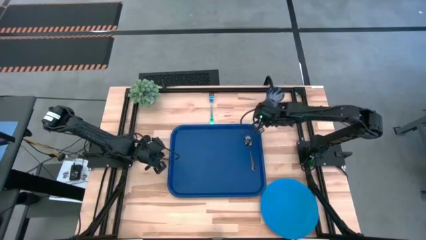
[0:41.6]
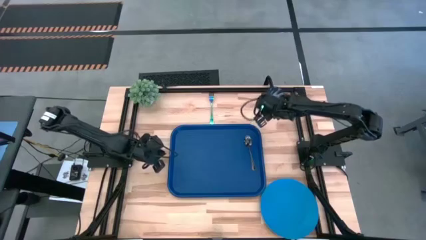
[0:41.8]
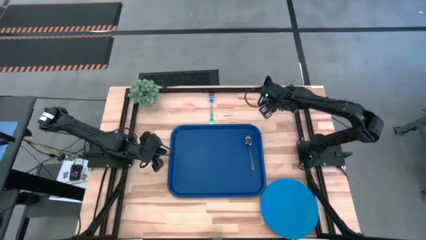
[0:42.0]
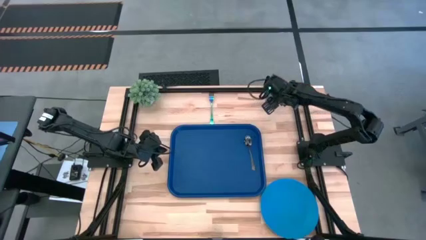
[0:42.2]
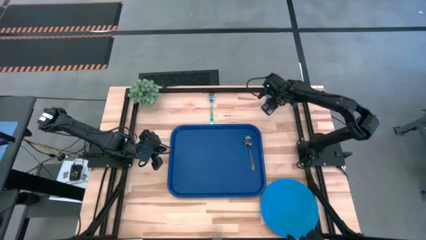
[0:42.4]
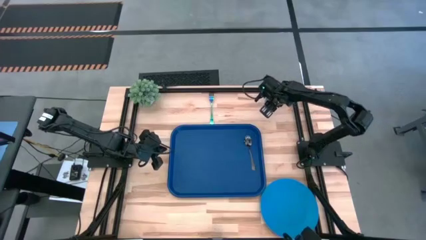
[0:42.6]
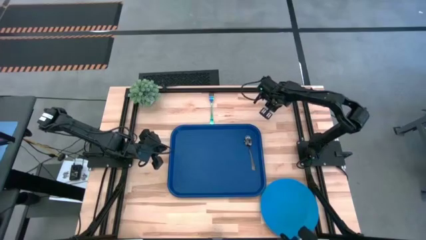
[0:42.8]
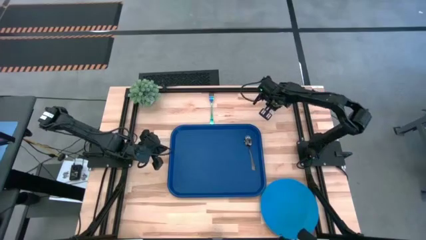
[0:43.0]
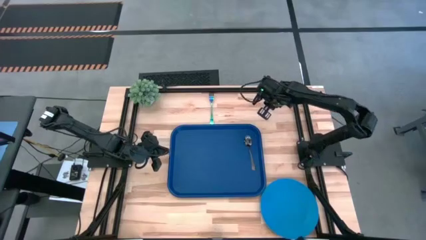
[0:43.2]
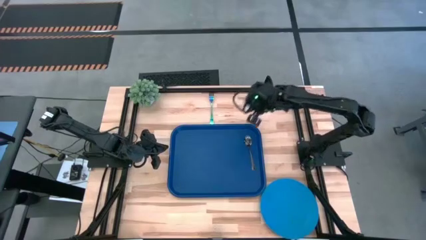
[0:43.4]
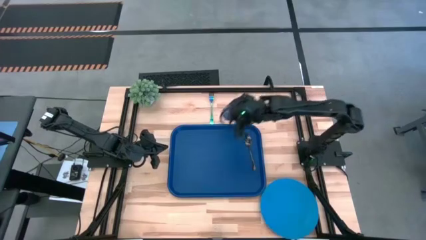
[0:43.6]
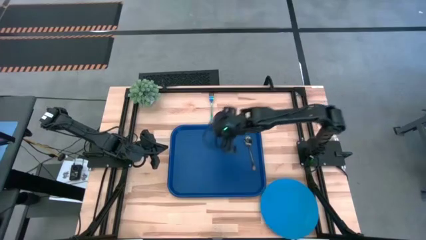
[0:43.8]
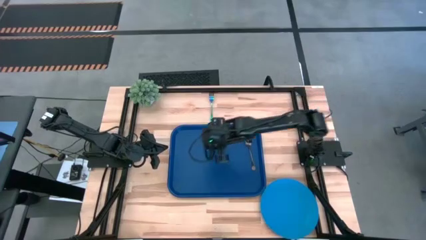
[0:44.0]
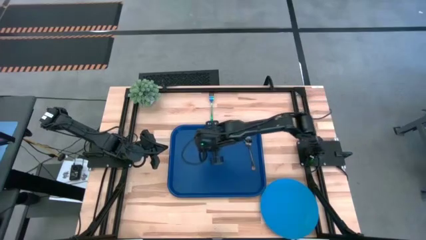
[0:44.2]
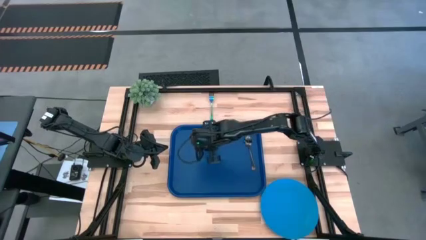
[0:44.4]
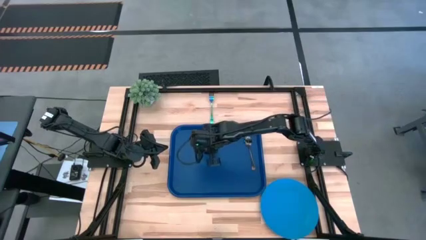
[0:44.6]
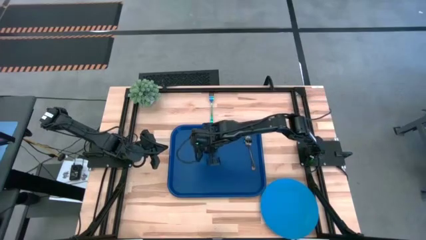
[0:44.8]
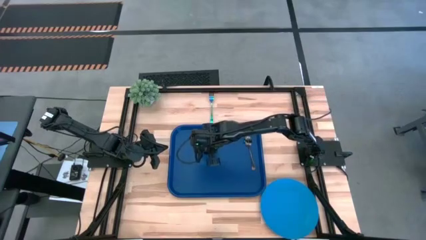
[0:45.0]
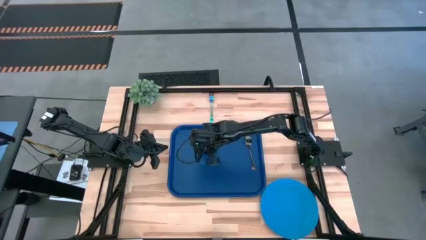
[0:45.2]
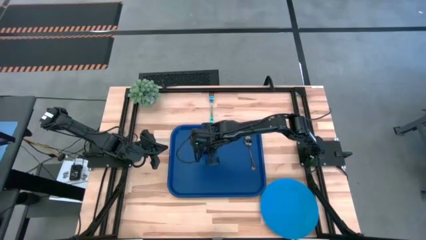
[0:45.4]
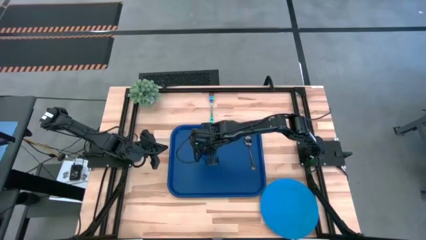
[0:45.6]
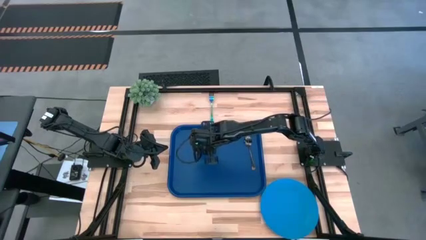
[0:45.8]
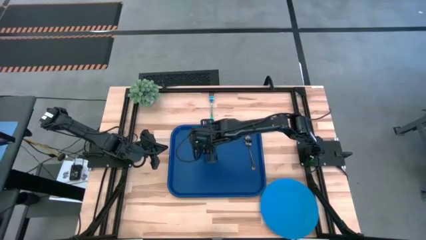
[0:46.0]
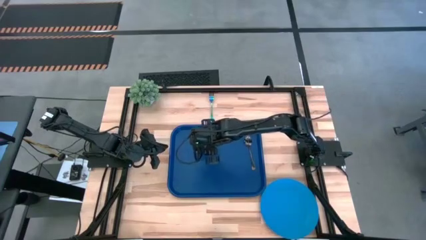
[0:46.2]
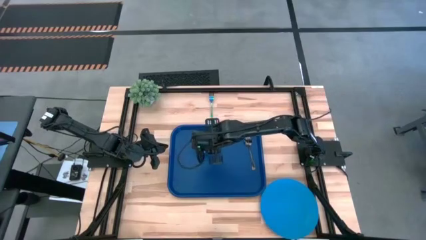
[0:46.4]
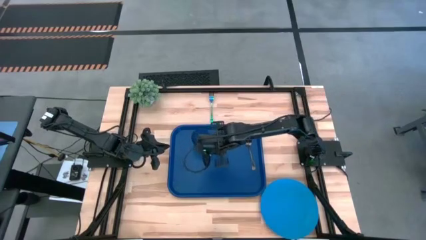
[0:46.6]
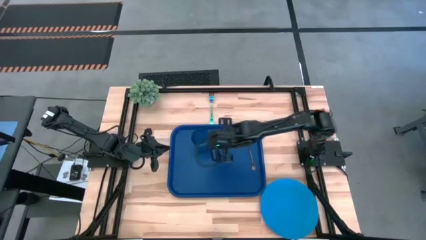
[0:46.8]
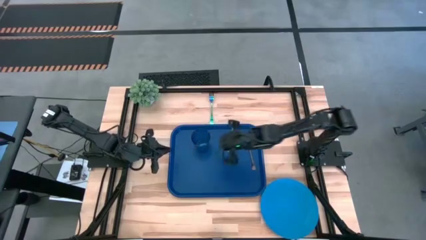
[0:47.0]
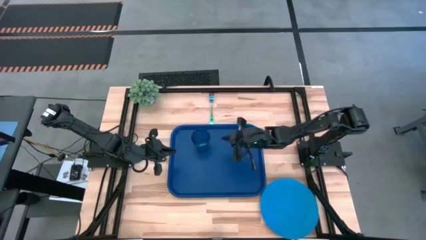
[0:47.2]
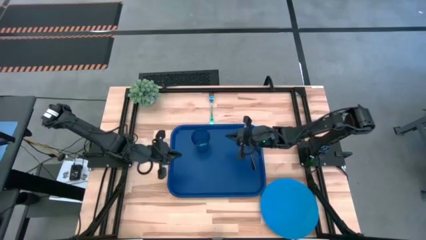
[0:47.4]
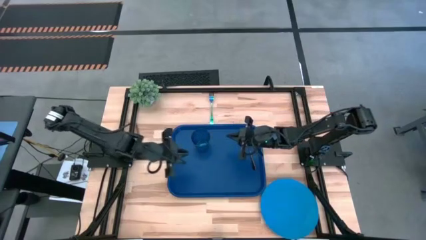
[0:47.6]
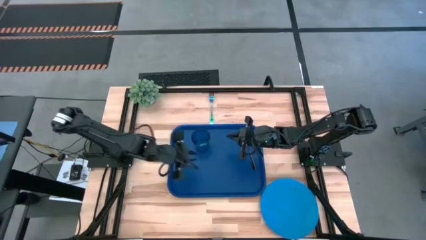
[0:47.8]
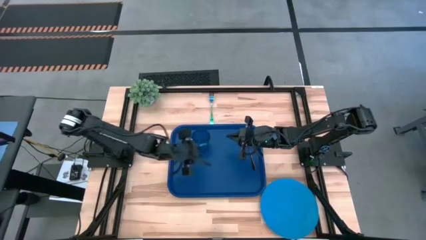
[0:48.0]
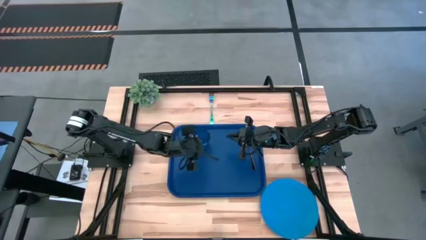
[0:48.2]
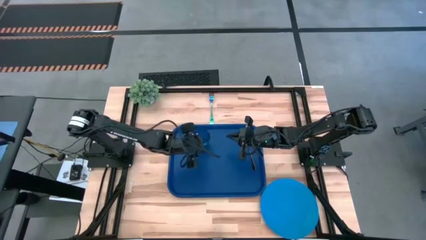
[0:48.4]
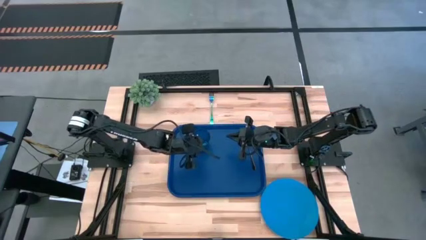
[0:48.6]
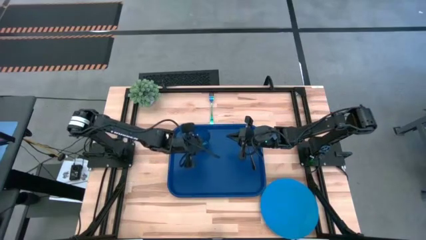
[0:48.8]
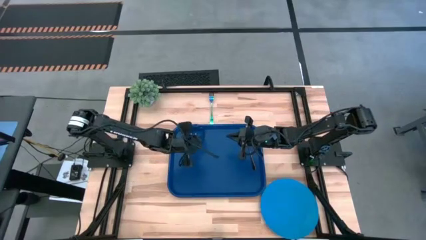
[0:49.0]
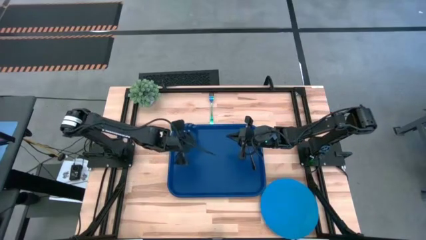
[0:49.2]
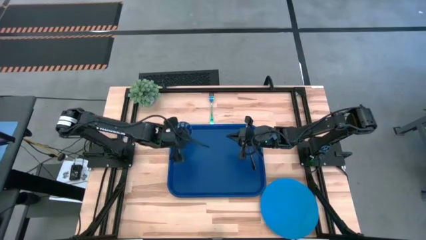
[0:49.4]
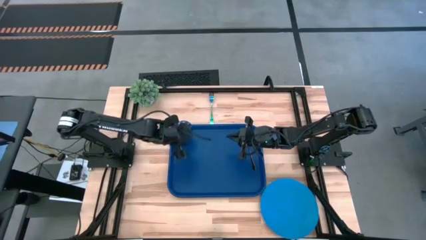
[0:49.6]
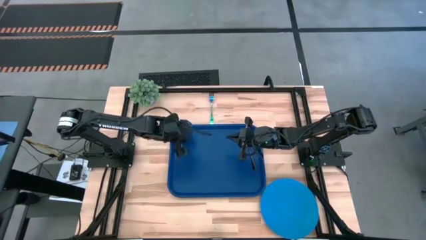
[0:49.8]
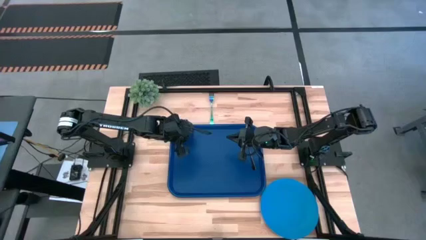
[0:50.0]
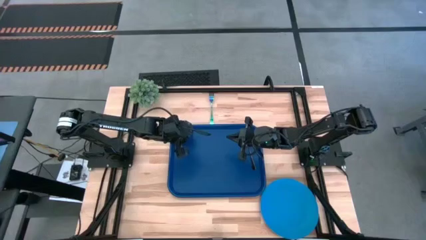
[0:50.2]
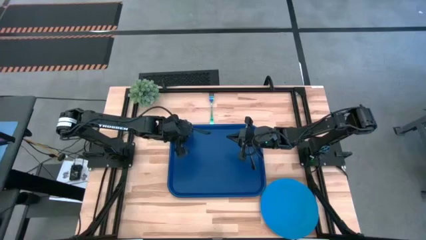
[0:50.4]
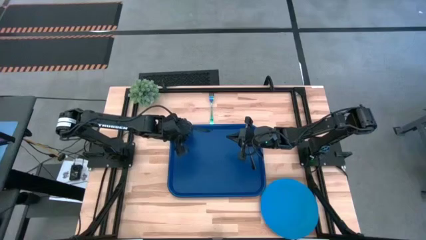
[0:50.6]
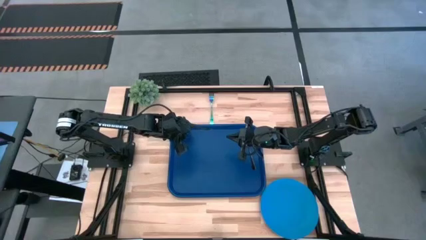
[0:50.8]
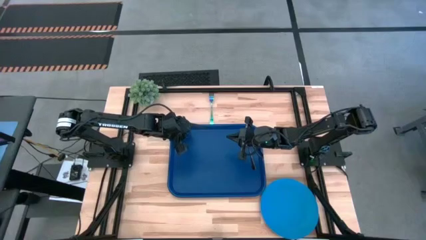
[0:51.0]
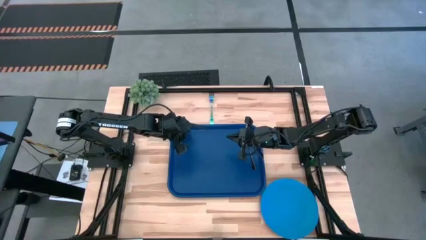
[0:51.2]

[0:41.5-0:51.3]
Task: Pick and place plate/cup/fork/spoon on tray
Put the blue cup on the blue tray

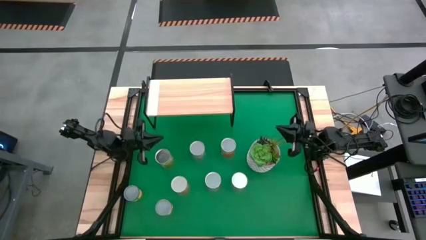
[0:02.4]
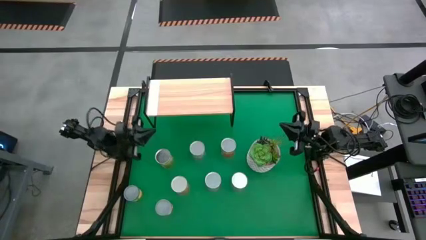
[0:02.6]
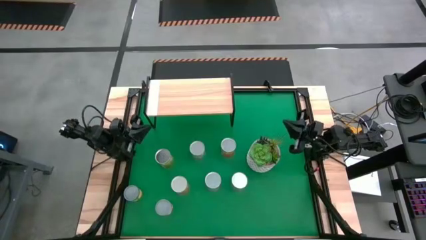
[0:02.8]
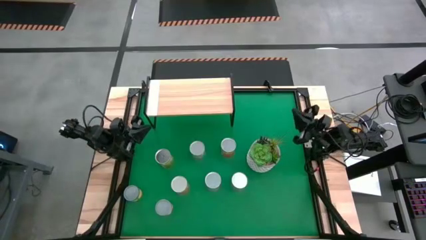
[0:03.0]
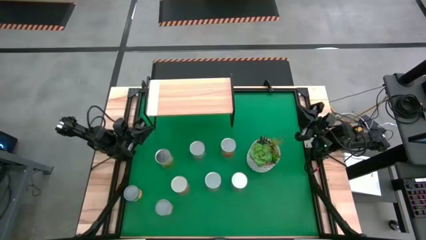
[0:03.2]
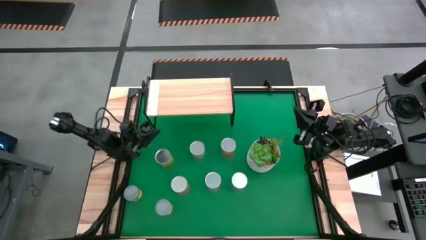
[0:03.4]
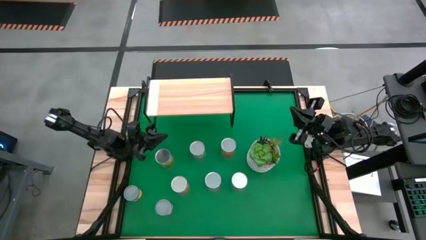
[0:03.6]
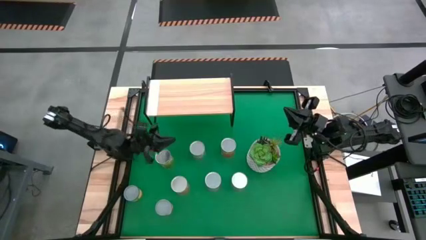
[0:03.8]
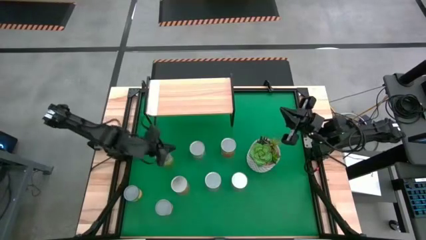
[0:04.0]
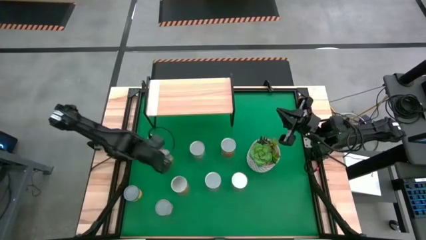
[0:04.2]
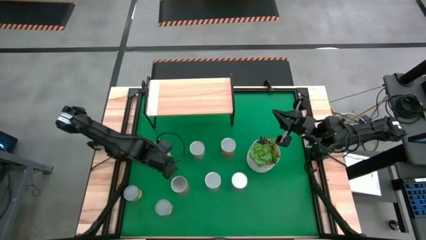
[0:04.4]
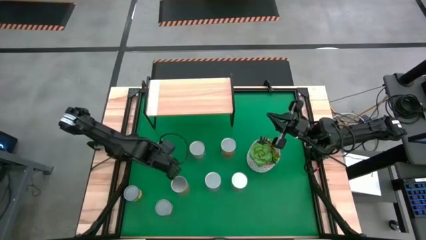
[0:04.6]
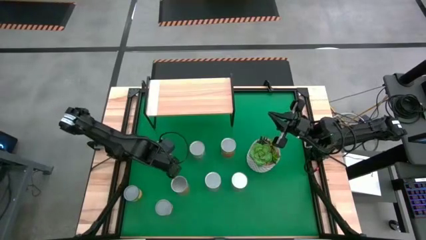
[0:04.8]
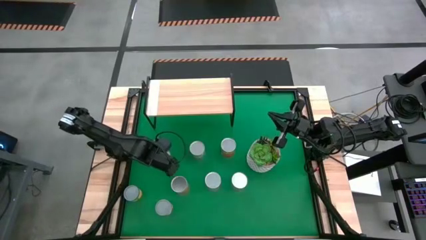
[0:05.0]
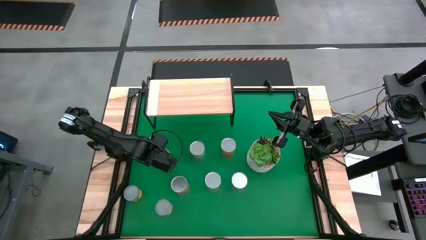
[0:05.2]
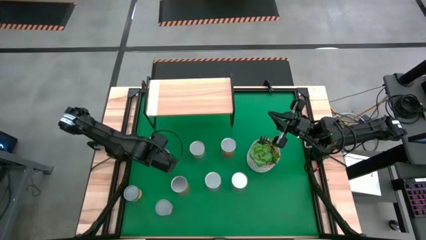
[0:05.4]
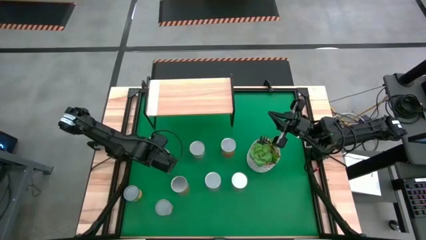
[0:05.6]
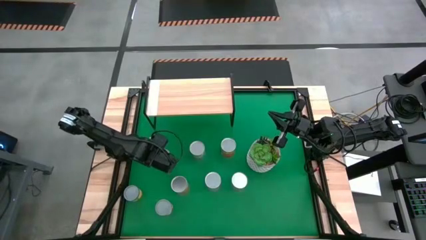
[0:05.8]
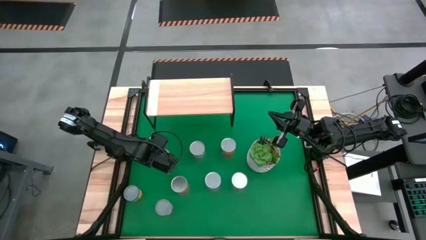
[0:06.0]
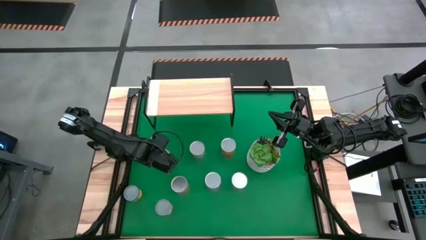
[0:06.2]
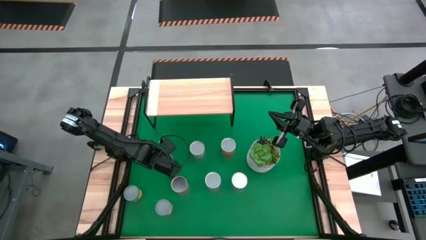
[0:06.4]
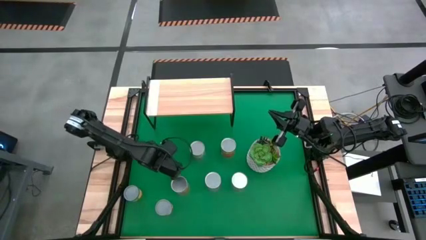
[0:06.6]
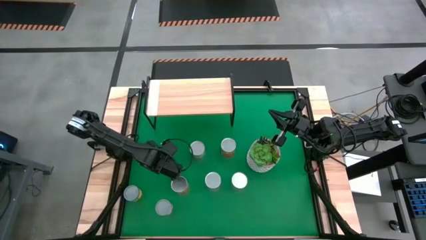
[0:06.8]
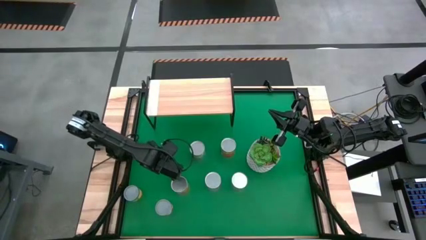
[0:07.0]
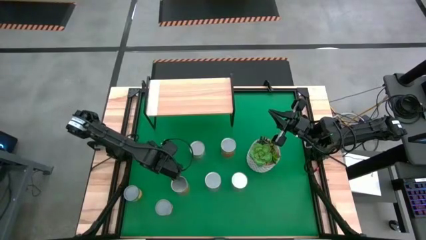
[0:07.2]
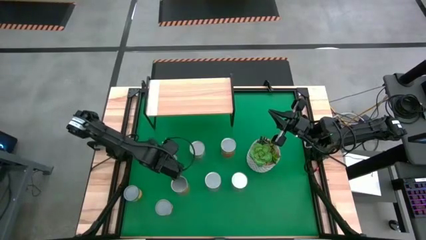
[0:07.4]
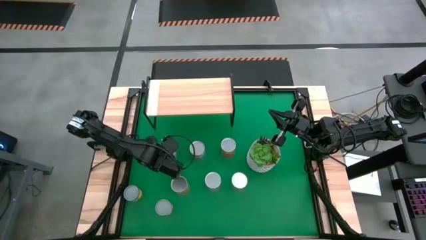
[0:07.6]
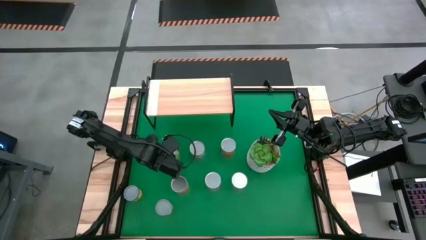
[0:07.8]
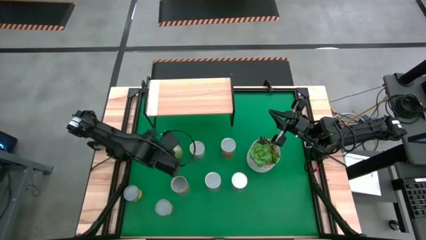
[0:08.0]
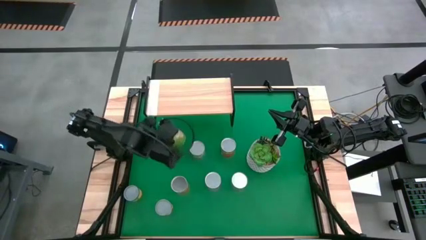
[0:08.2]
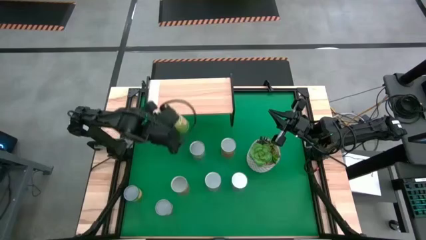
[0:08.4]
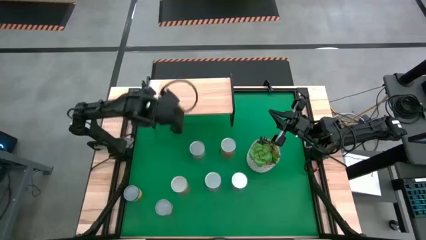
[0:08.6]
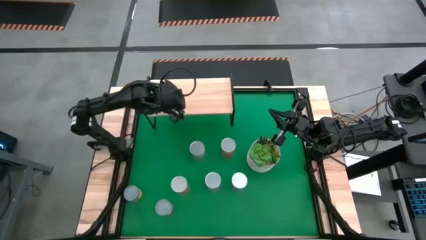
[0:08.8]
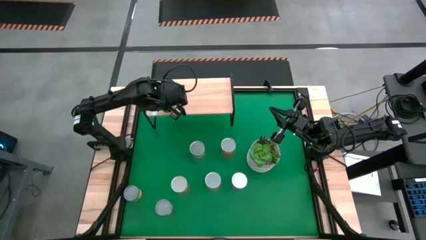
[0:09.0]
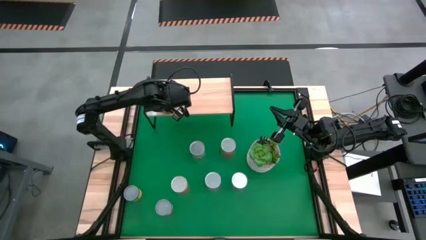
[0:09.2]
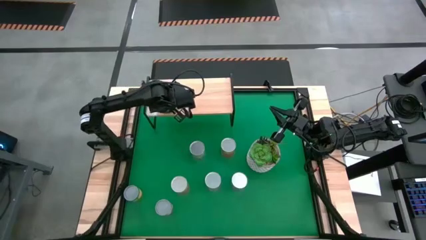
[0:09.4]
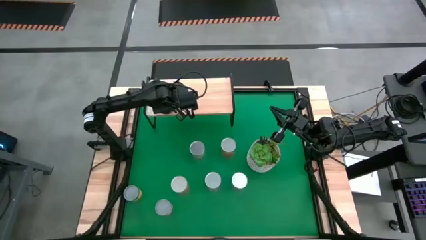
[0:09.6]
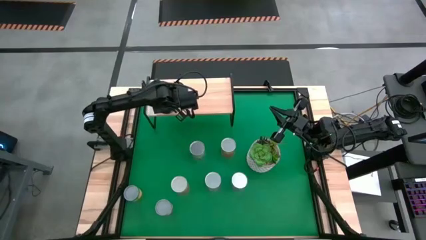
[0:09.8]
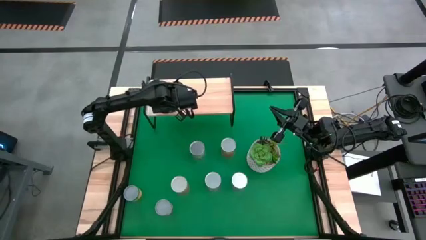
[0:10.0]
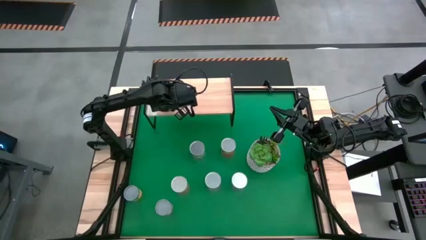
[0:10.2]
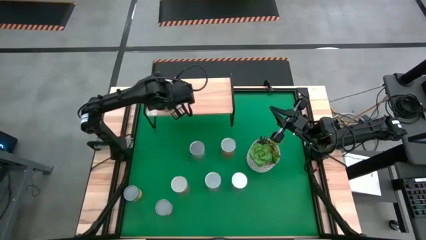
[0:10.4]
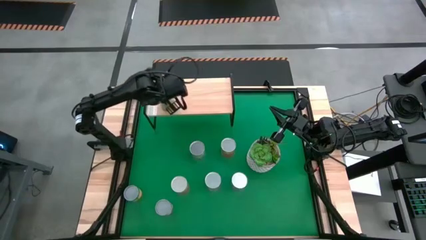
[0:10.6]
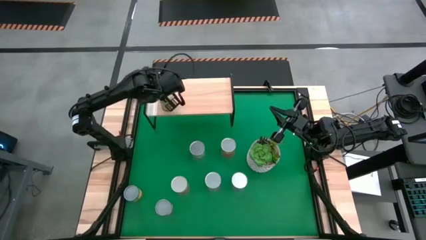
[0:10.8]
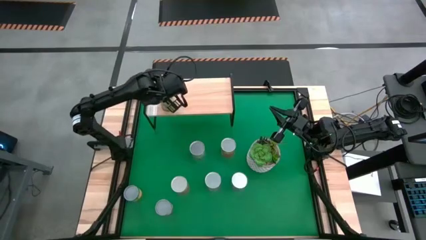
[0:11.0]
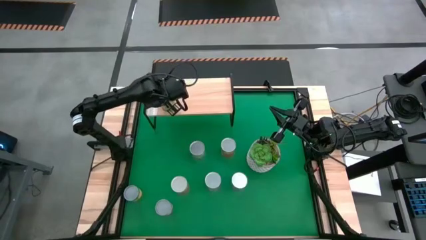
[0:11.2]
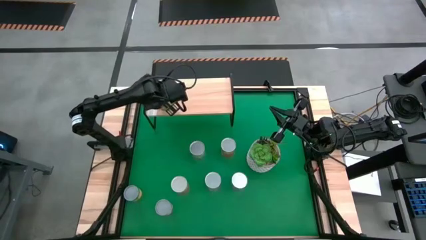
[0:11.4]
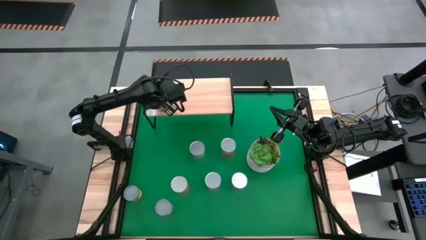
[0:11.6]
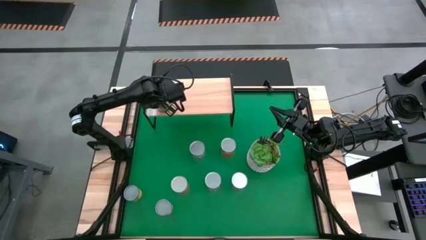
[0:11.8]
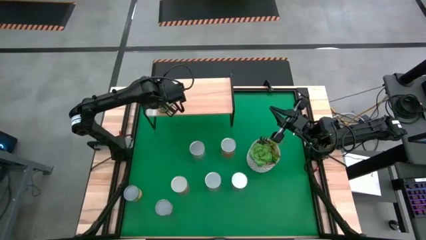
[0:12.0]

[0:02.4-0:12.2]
Task: Pick and place cans onto a shelf
Put the canned oranges on the shelf
